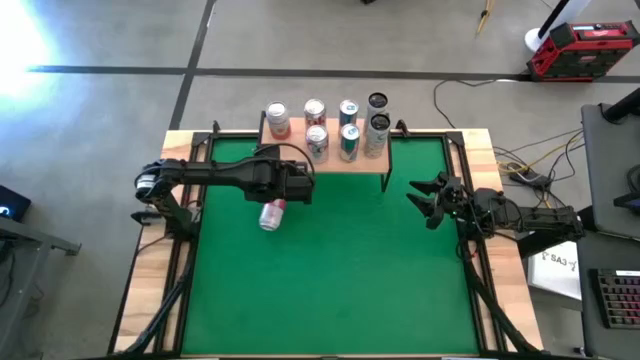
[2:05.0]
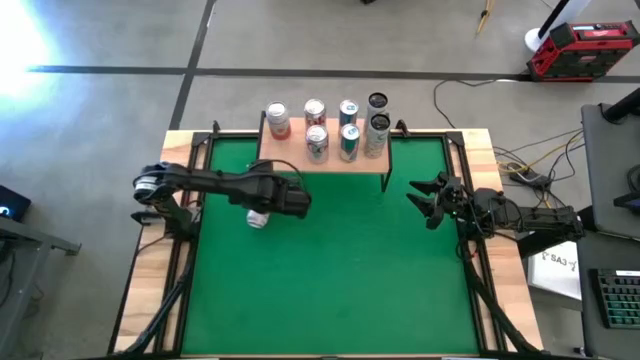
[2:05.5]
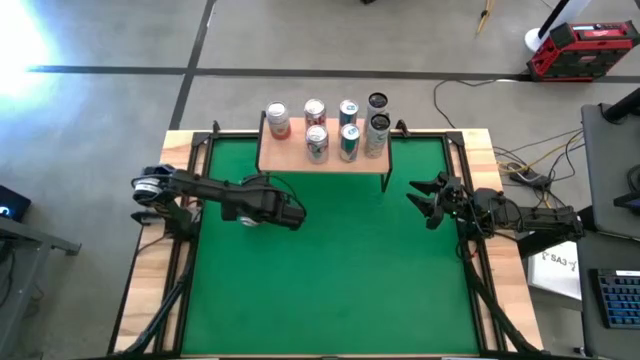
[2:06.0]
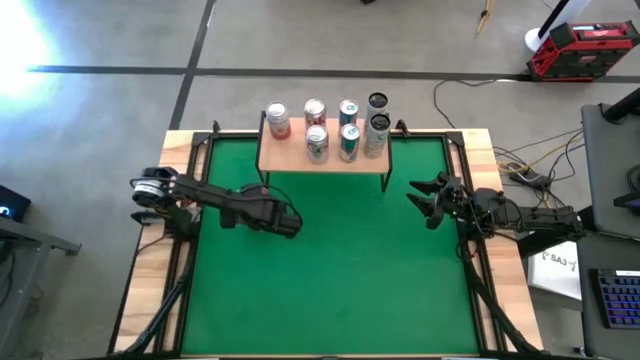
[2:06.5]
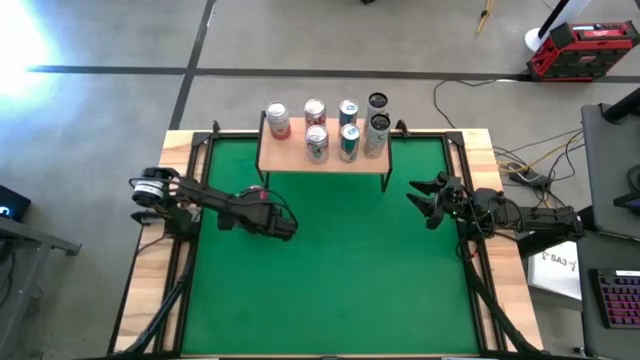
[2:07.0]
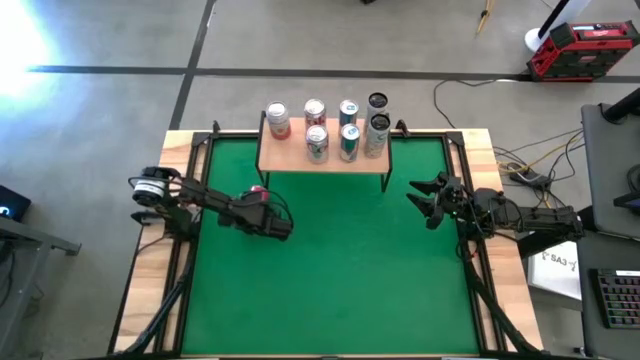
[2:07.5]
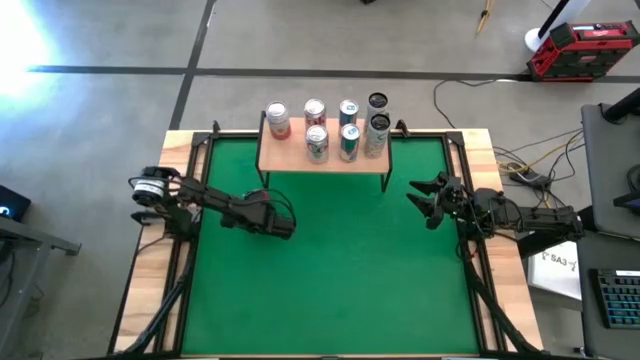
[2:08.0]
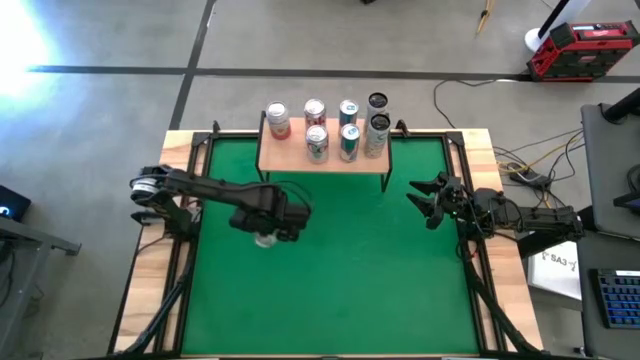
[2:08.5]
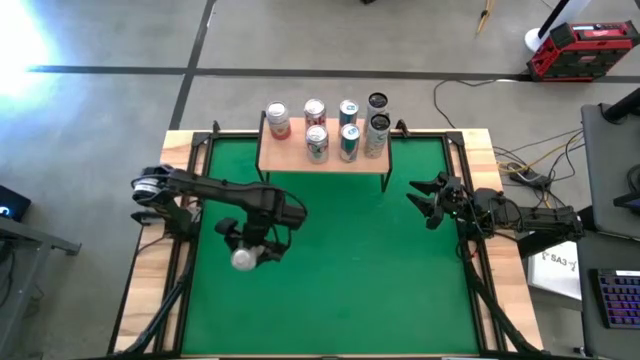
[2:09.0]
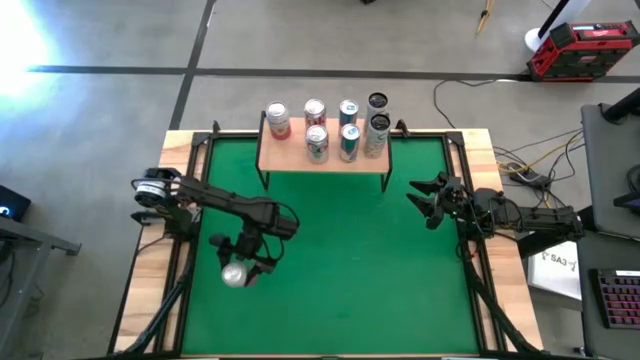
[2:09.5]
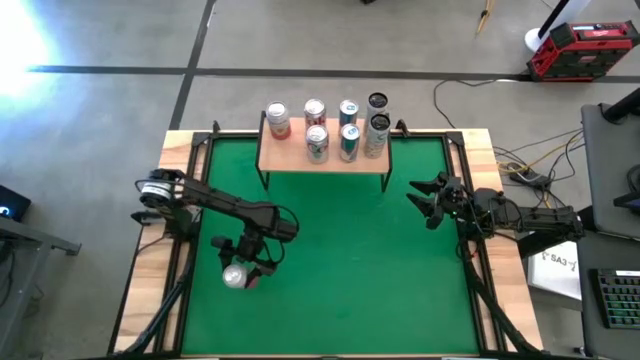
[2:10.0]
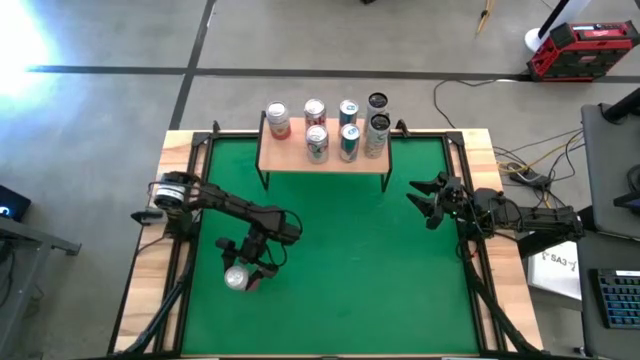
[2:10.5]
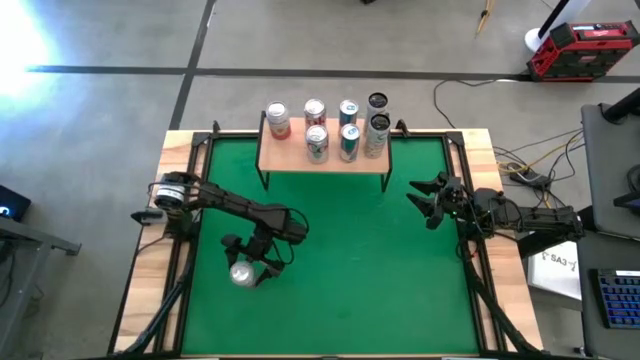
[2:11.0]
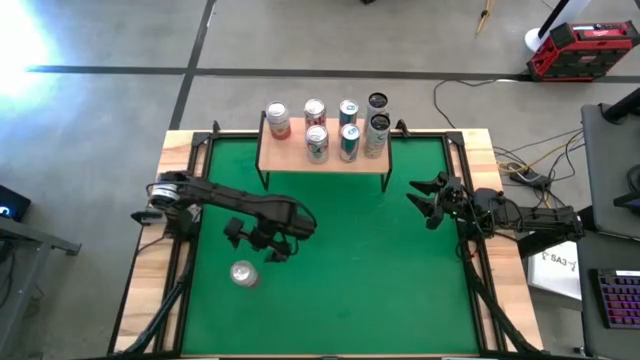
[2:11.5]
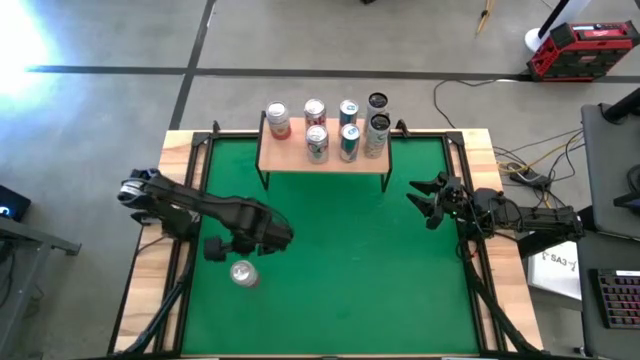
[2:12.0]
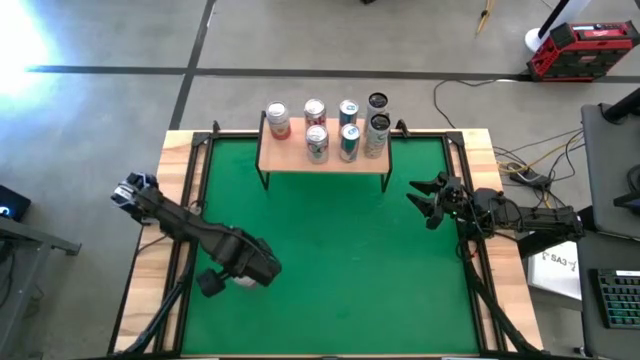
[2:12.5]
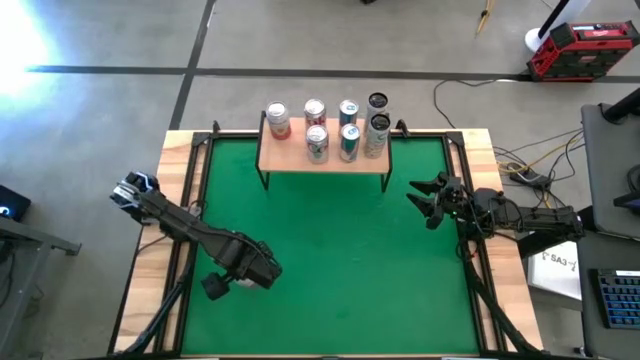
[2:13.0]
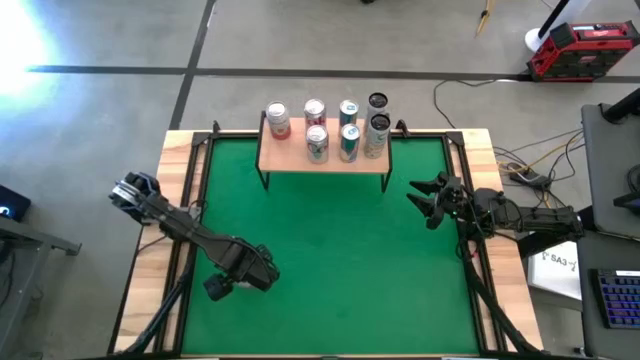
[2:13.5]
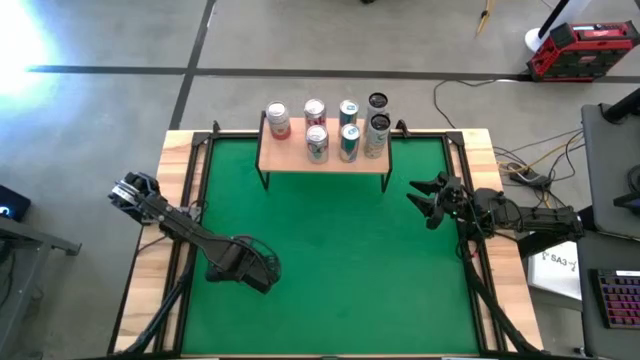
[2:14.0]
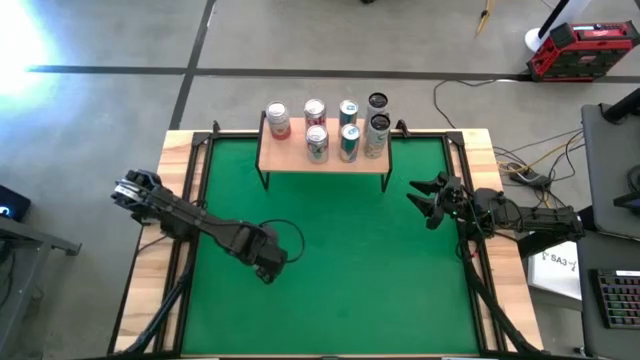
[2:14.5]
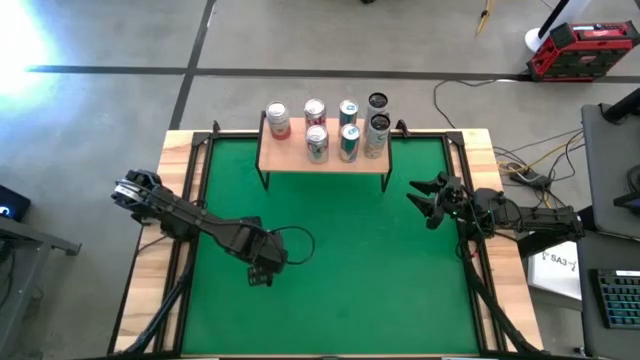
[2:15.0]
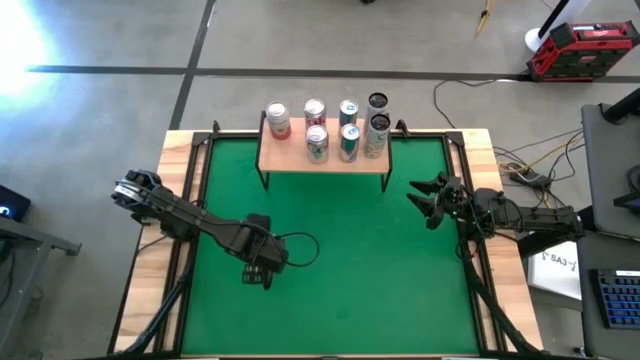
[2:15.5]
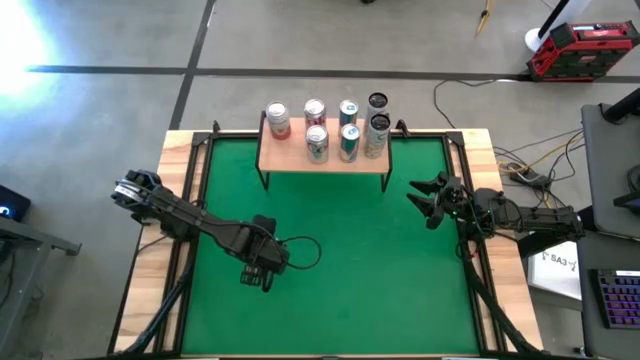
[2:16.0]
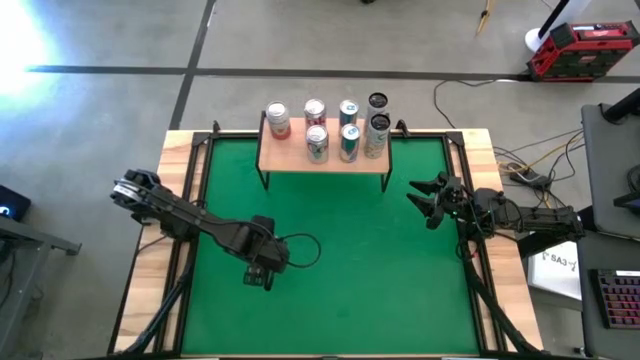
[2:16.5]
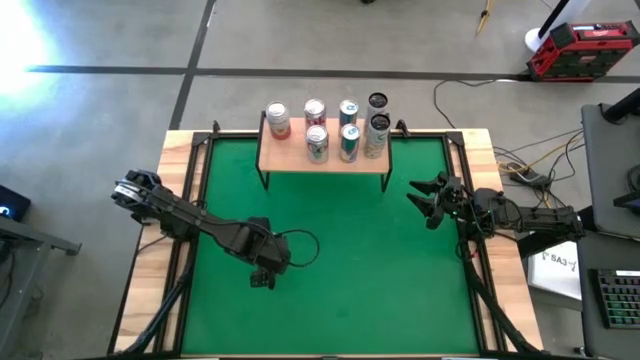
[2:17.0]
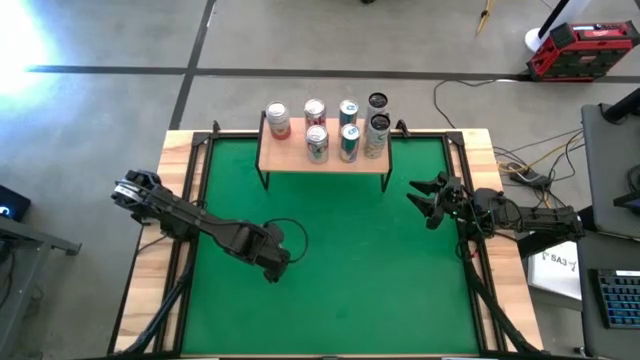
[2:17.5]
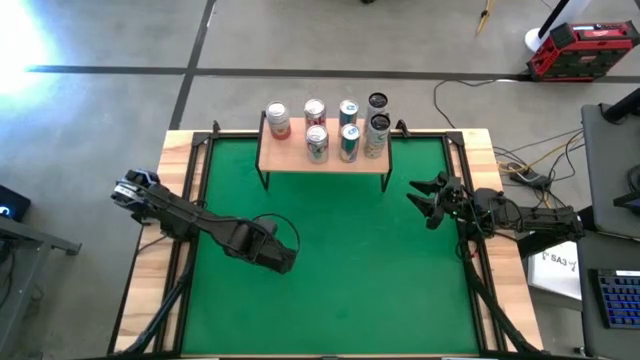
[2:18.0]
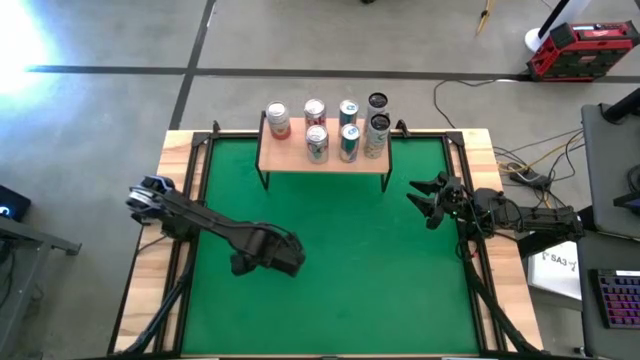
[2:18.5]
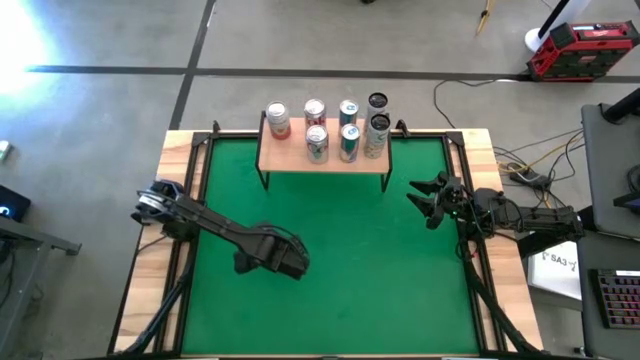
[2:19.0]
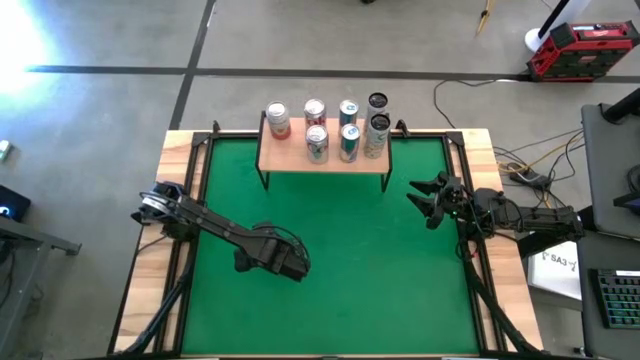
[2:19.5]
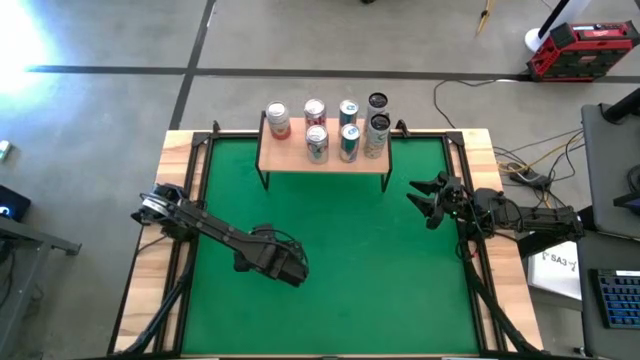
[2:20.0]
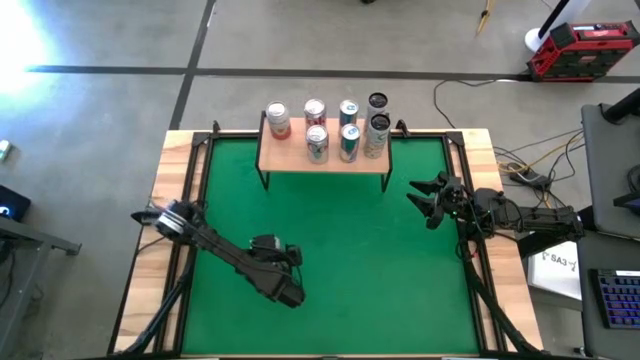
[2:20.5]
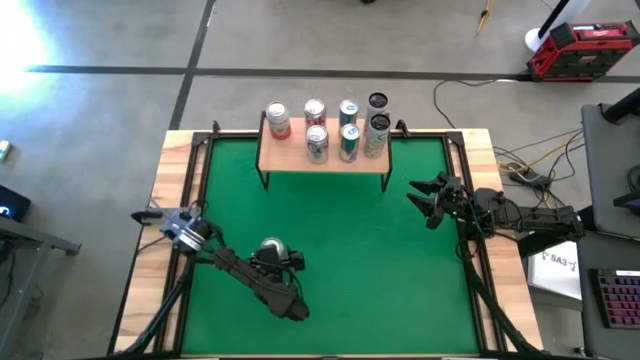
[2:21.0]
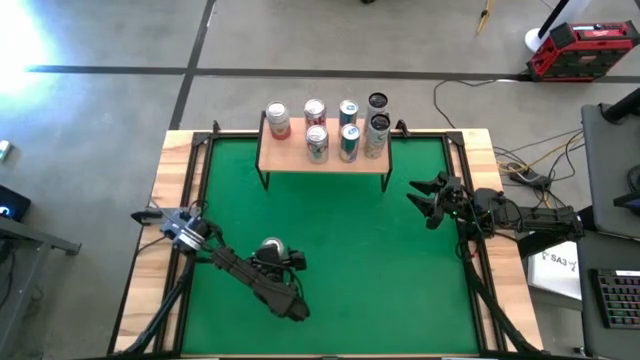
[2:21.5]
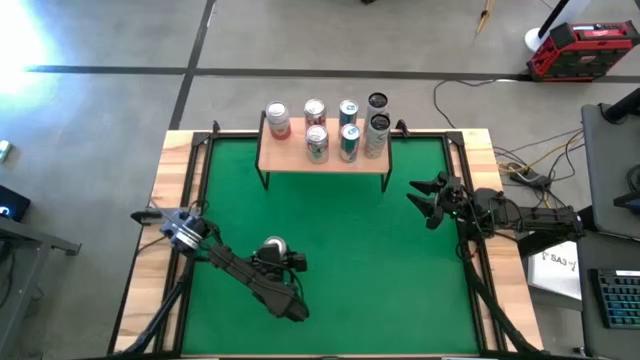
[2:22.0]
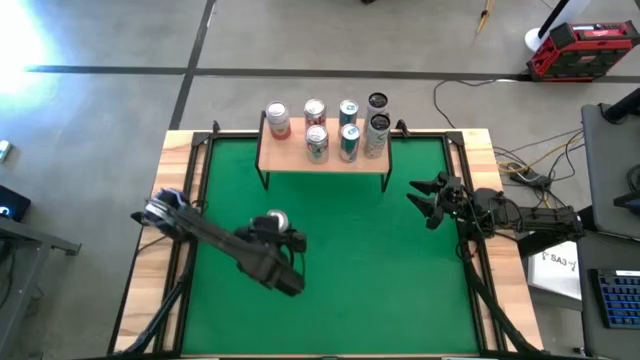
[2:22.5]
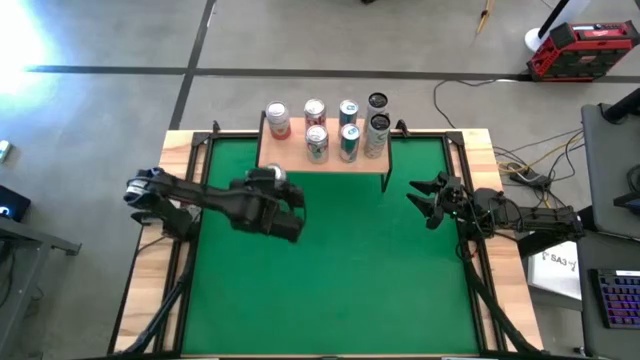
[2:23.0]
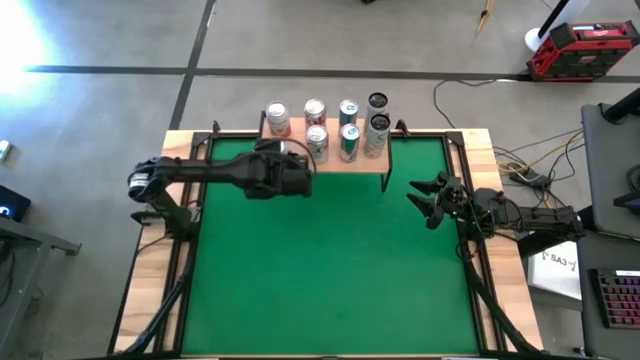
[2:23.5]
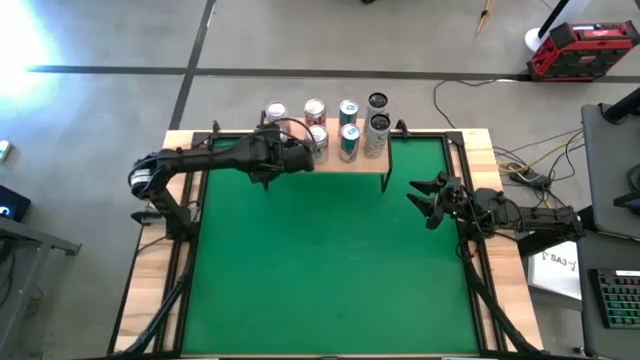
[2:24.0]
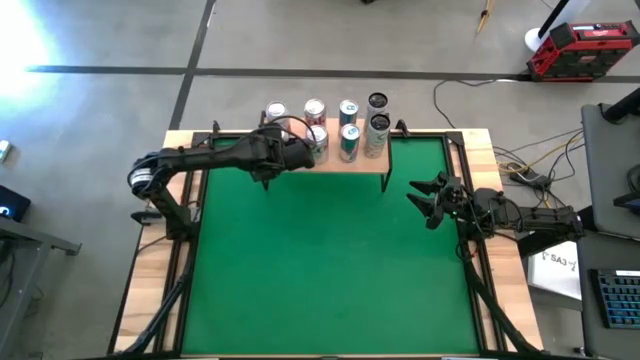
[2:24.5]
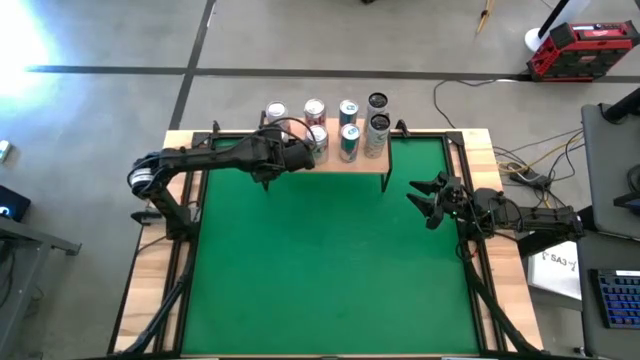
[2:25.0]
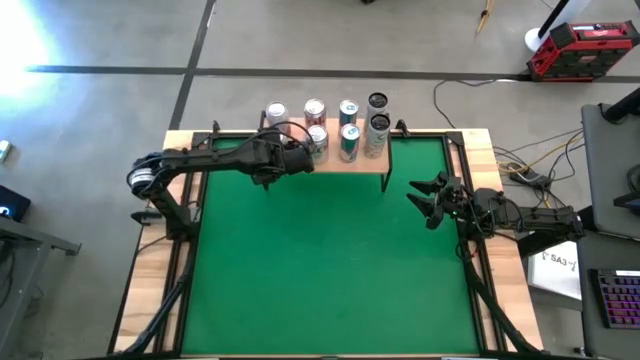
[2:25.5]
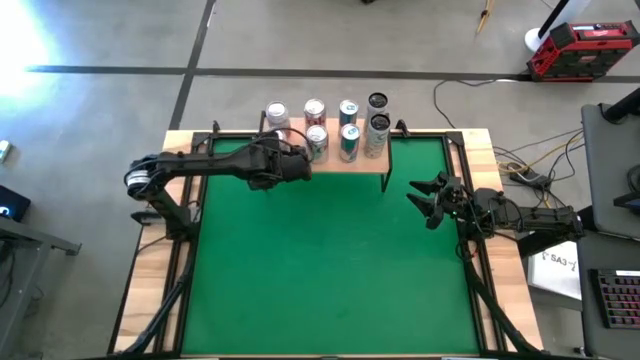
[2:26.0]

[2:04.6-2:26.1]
Task: Place canned beverage on shelf
Put the pink-white soda can on the shelf aligned with the other pink-white soda can
